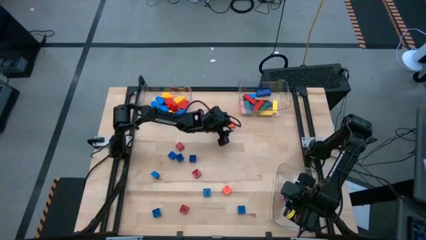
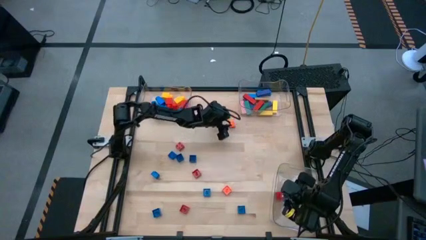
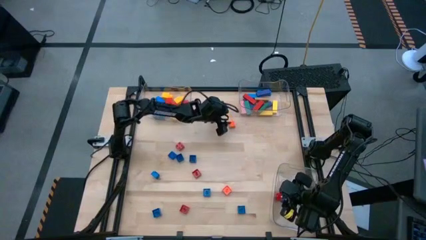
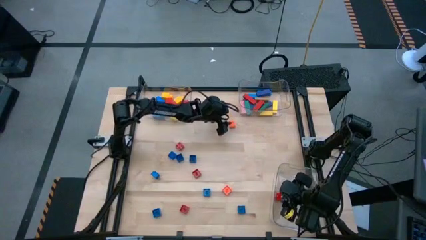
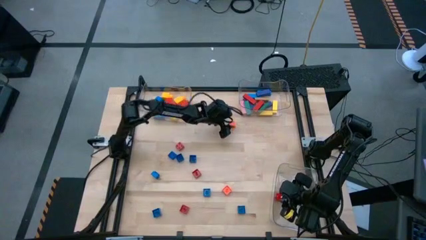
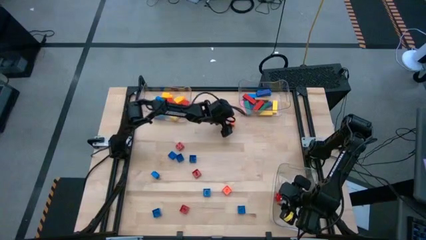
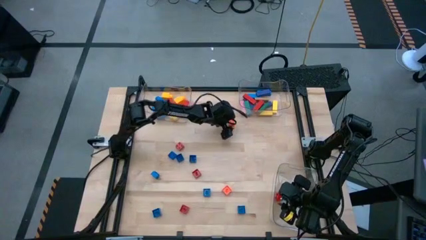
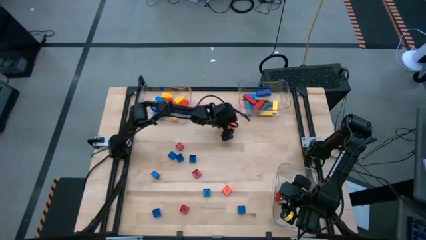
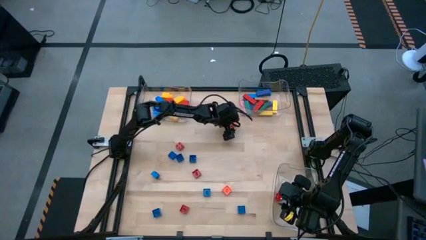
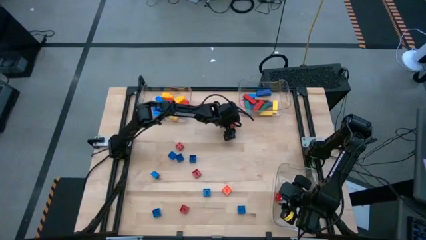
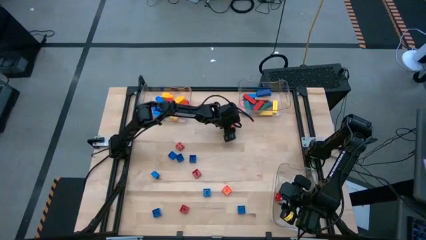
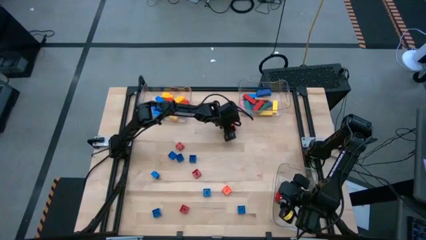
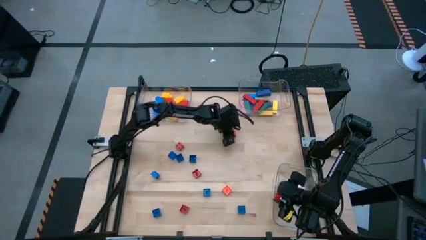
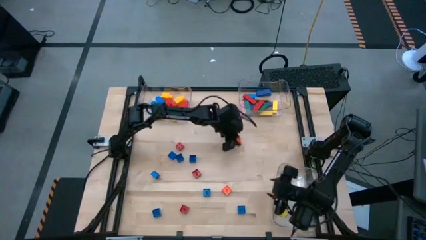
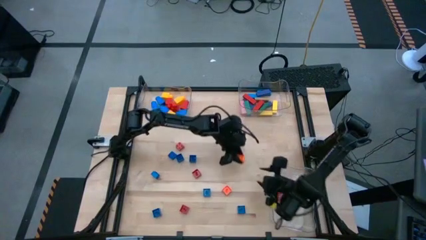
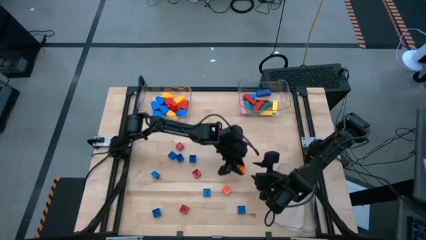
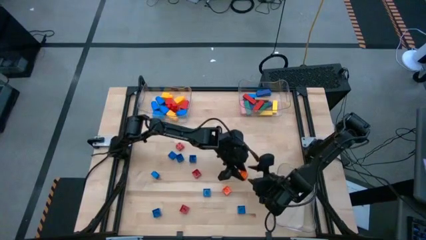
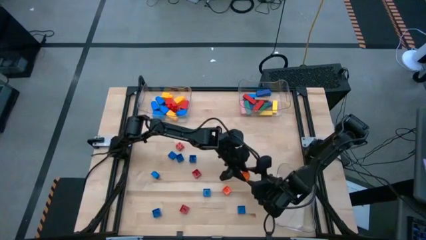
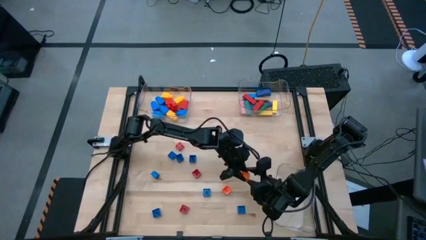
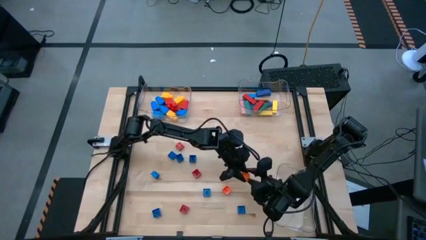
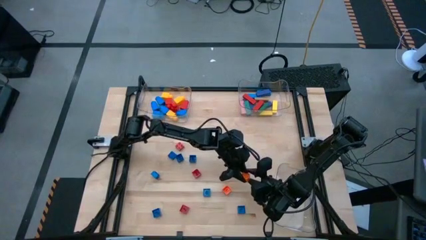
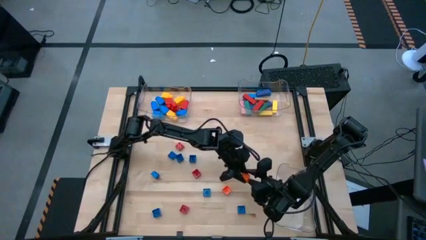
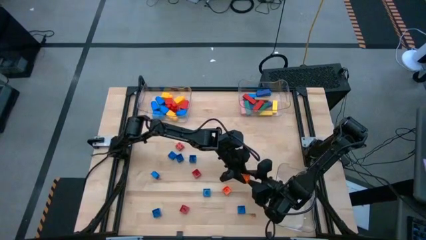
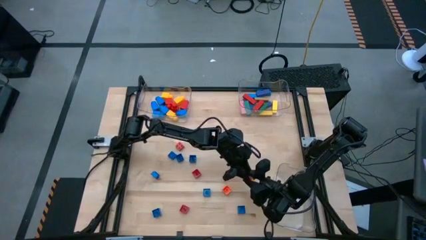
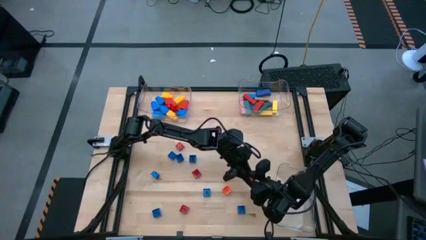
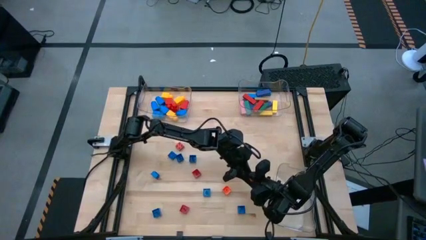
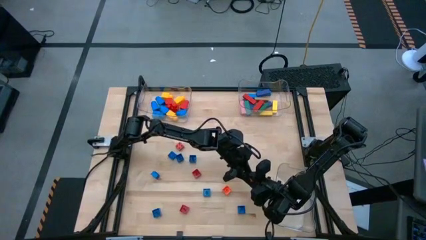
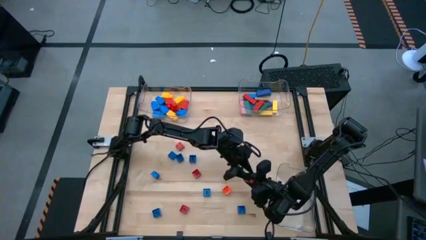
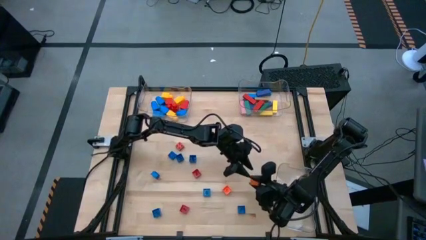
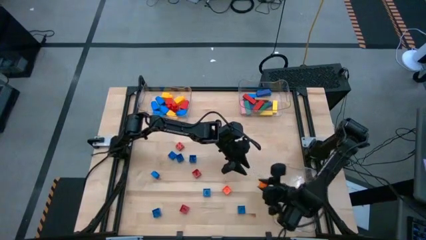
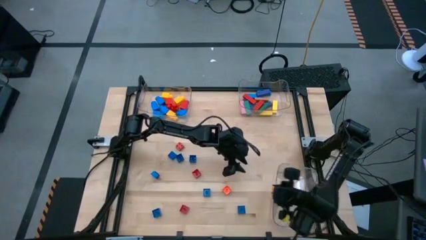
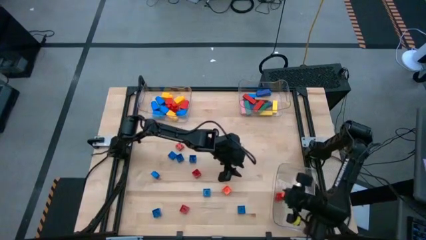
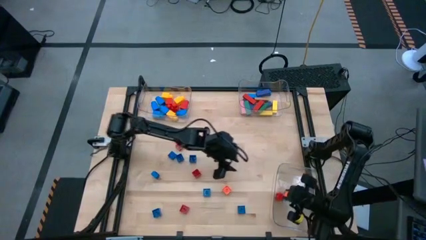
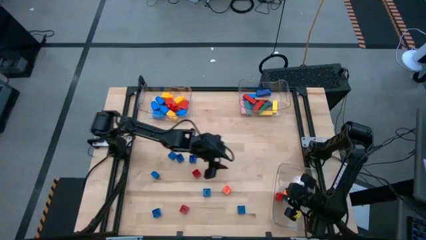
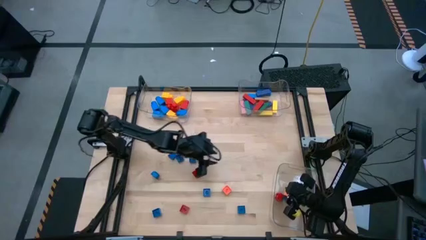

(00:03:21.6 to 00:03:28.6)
Task: Sort blocks by size
Put the 4 stud orange game piece into the bottom transparent bin

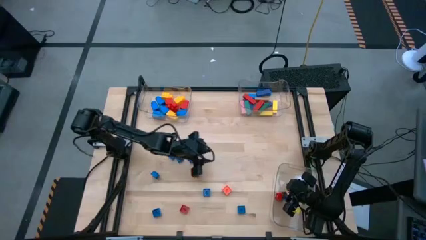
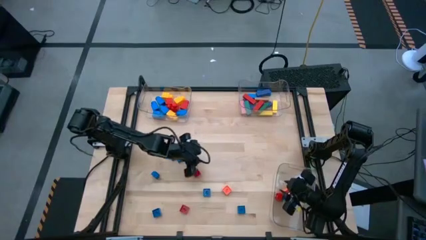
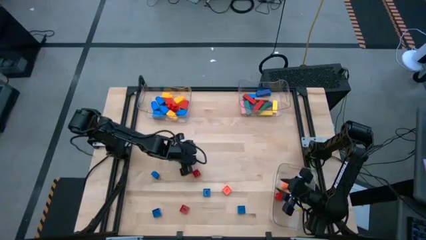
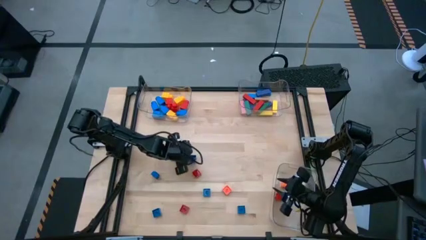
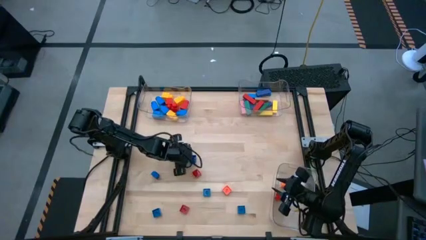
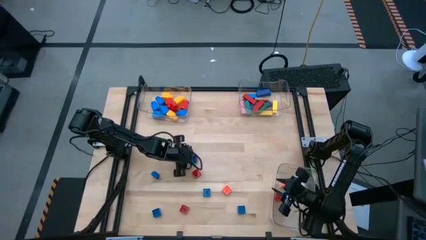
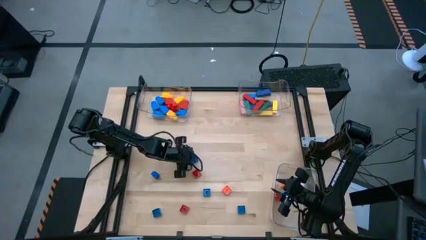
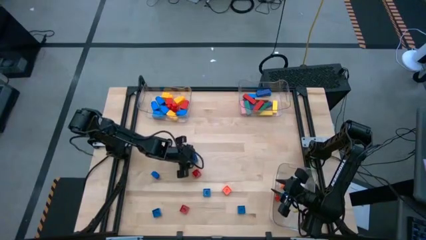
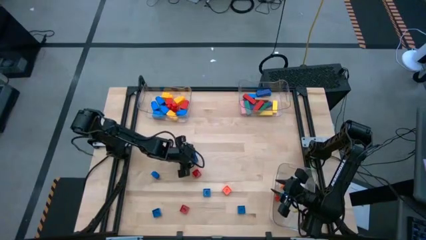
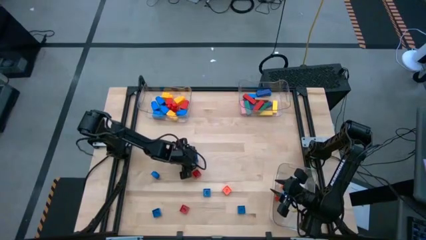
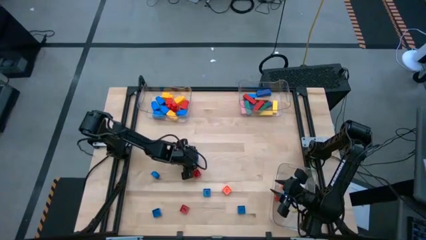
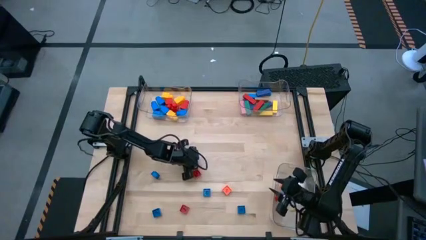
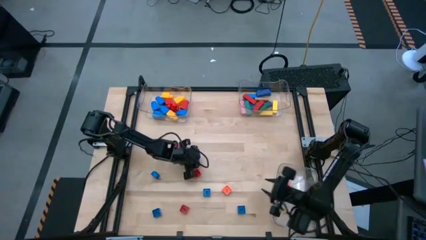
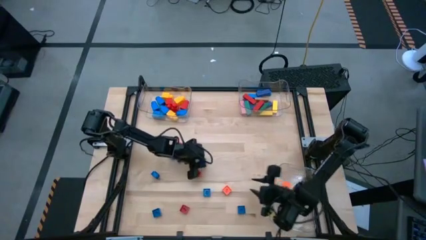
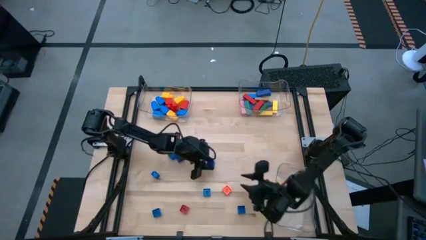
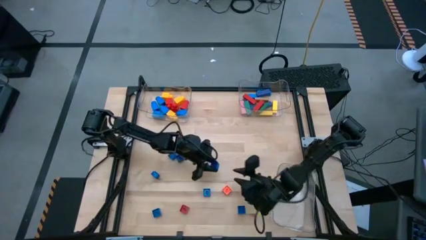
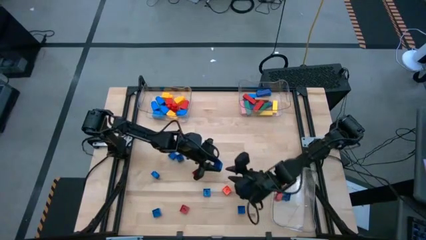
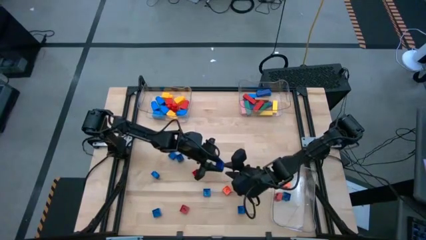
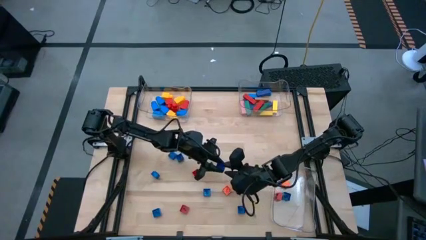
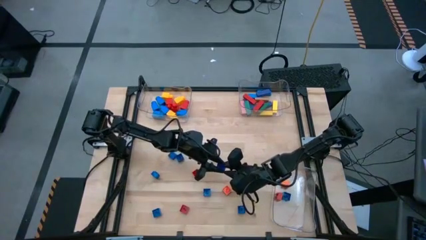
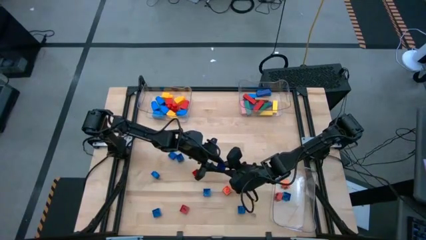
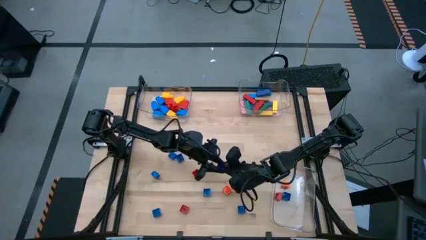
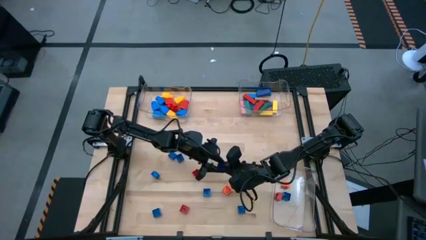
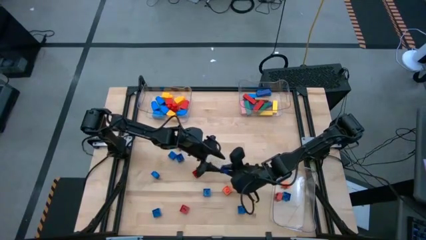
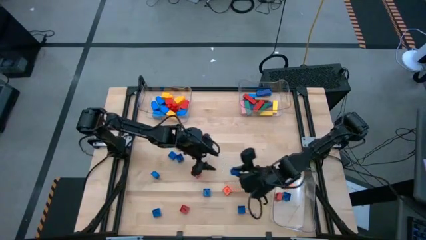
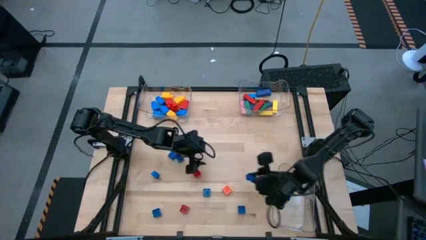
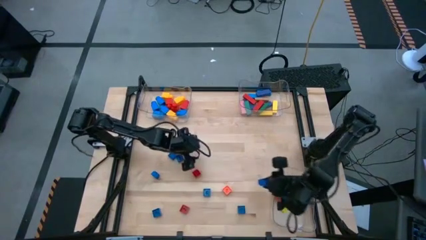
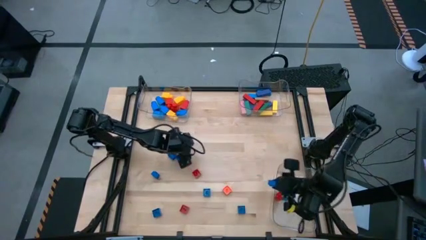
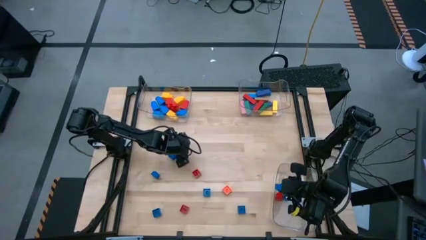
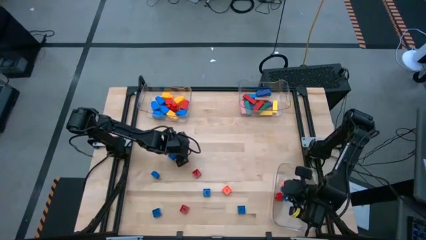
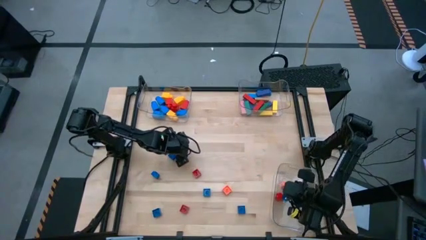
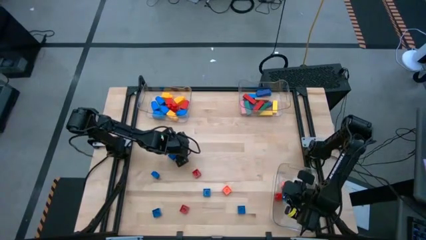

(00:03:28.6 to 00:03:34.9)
Put the 4 stud blue game piece into the bottom transparent bin

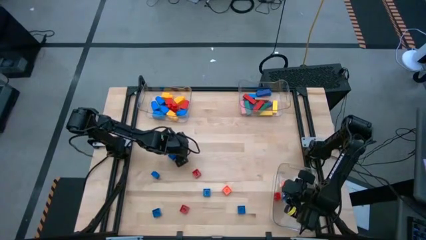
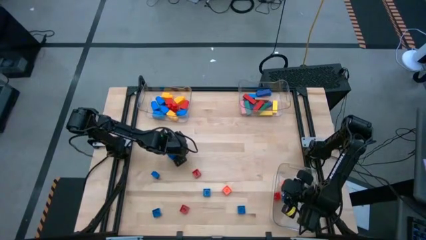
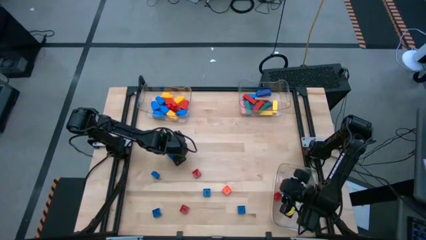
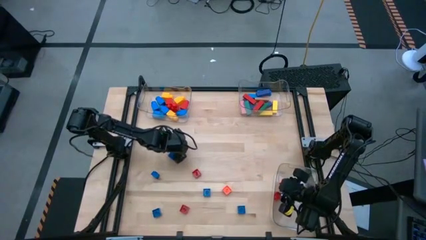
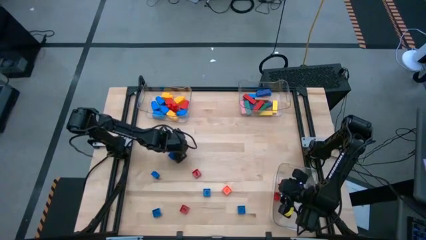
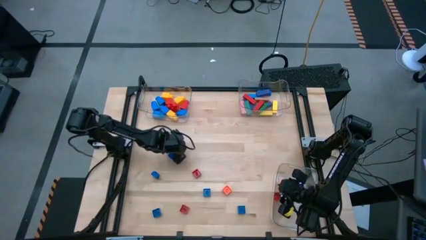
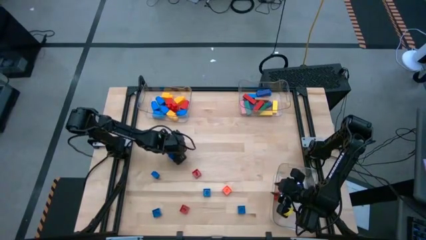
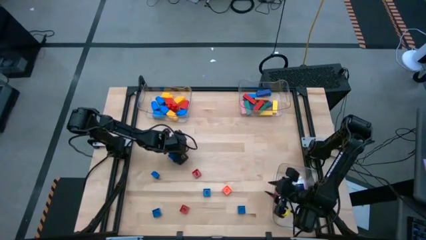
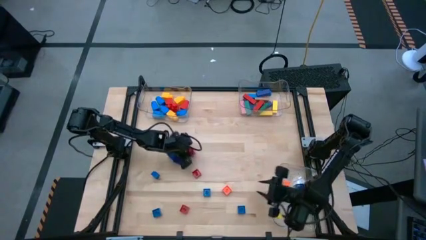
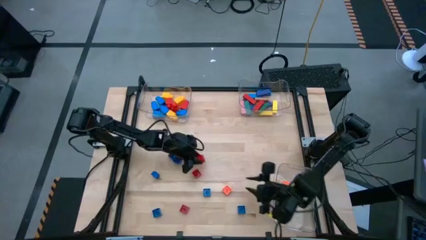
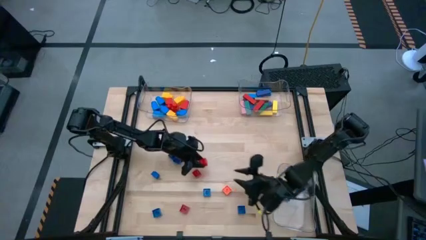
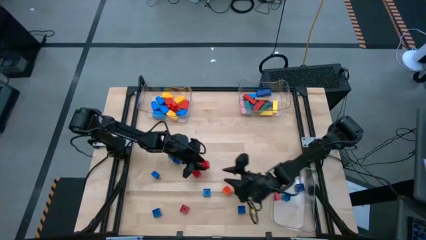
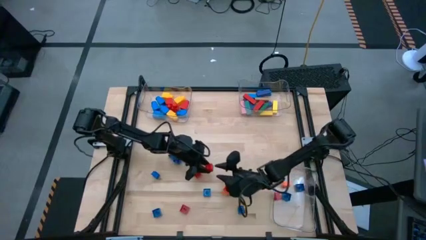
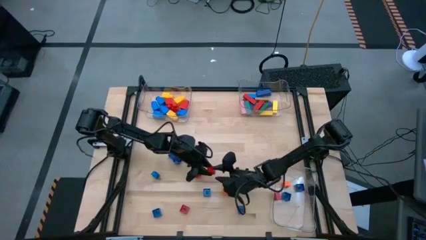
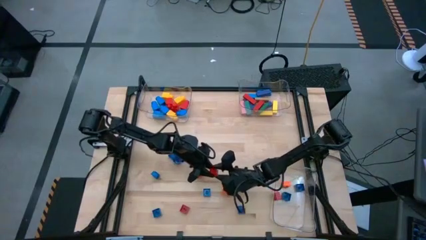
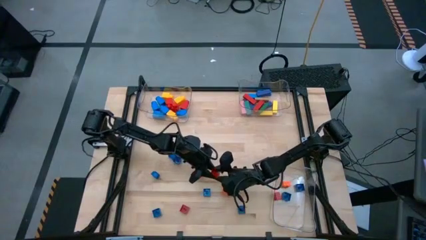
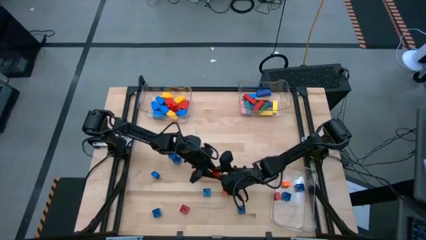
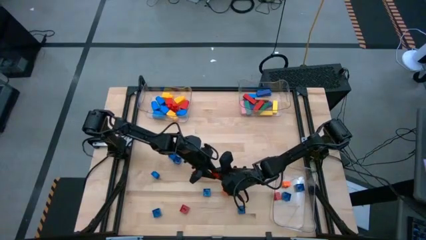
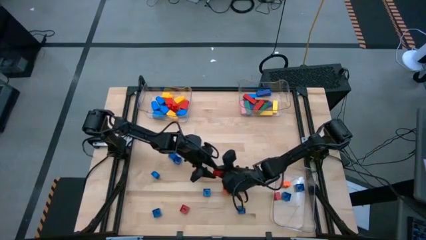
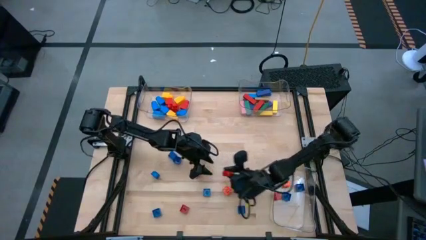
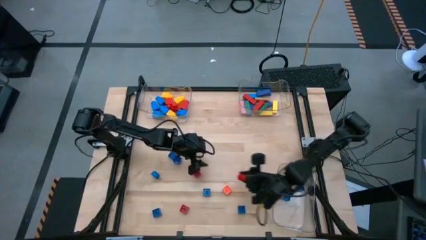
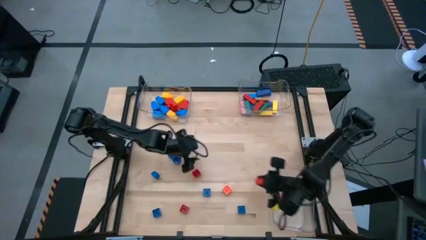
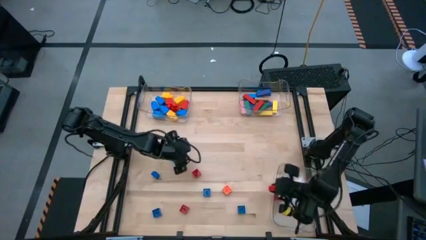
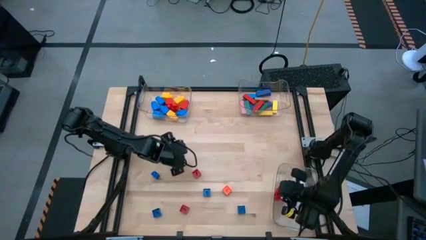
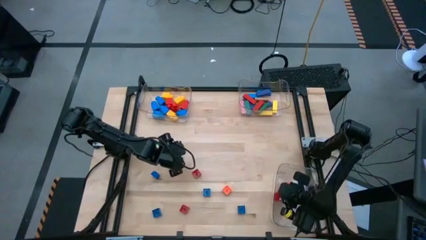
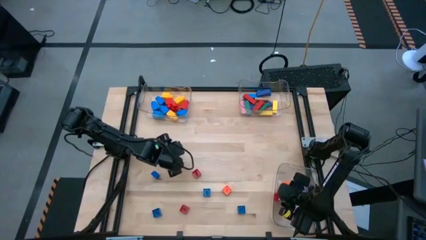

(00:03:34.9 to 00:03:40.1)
Put the 4 stud red game piece into the bottom transparent bin
